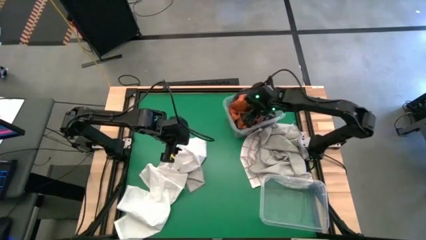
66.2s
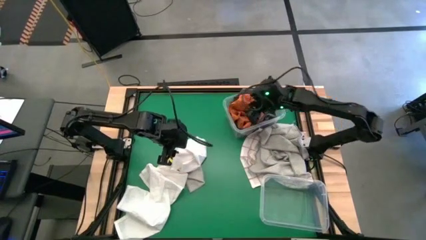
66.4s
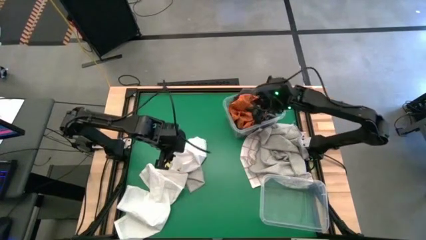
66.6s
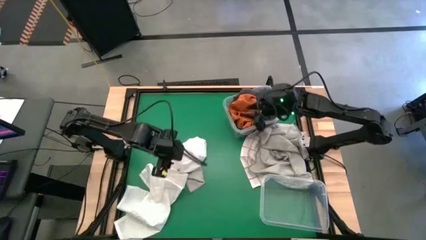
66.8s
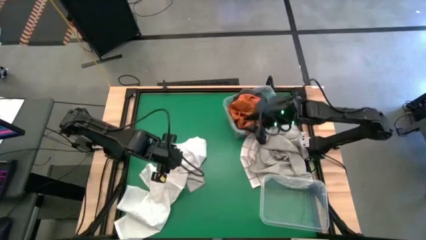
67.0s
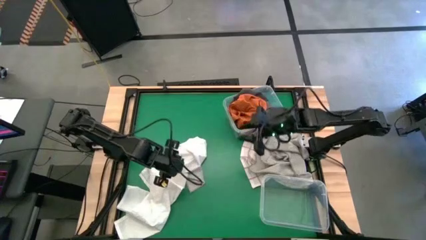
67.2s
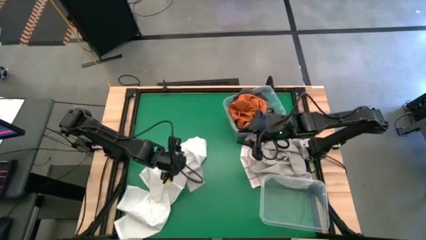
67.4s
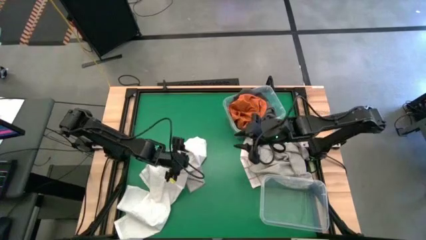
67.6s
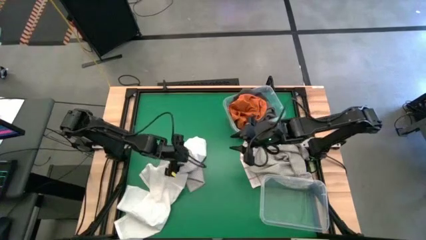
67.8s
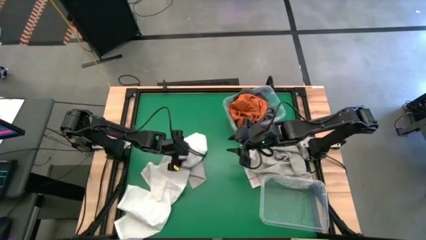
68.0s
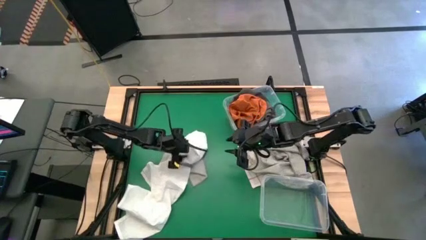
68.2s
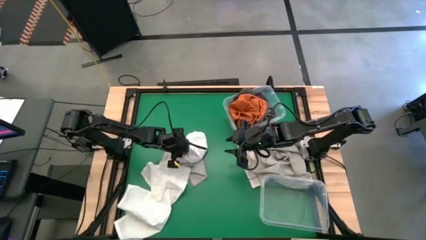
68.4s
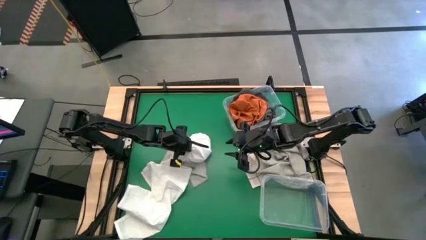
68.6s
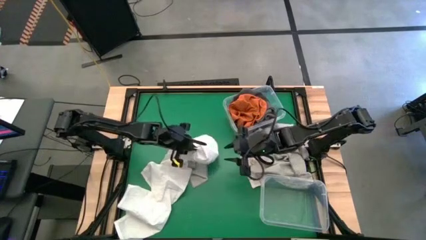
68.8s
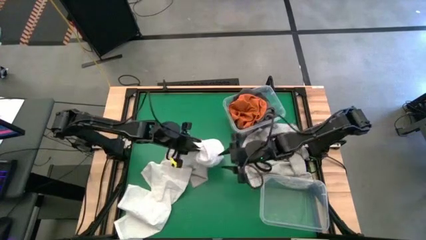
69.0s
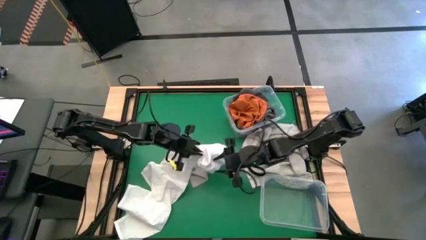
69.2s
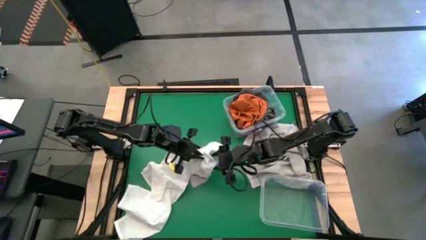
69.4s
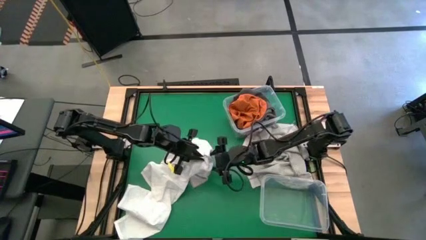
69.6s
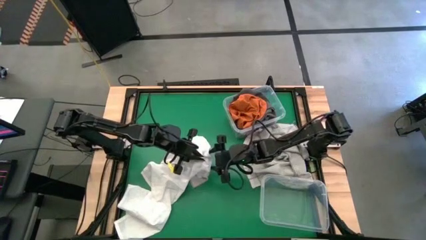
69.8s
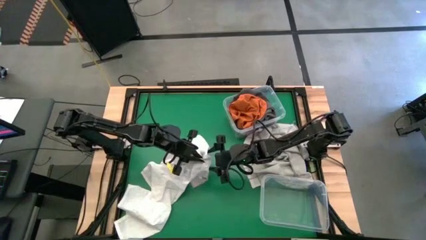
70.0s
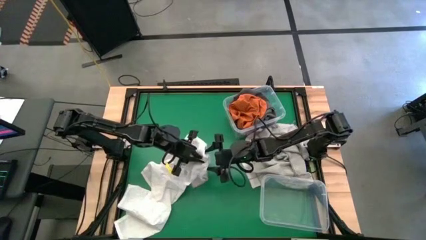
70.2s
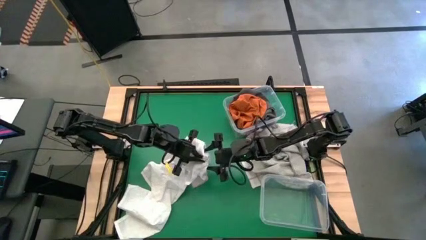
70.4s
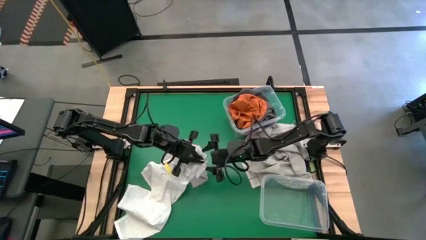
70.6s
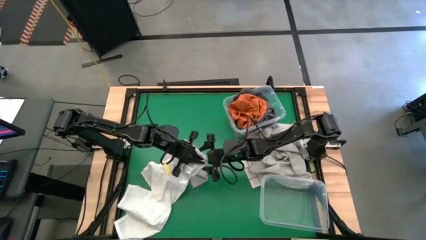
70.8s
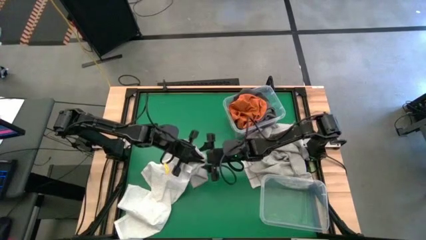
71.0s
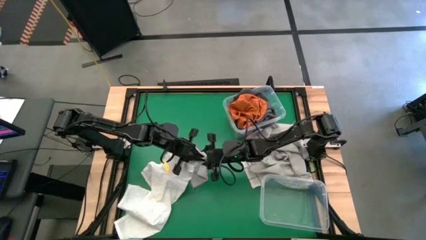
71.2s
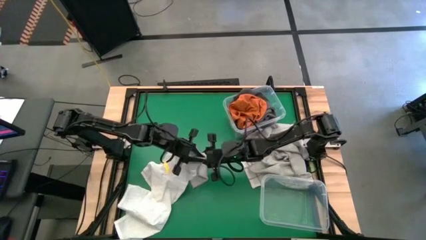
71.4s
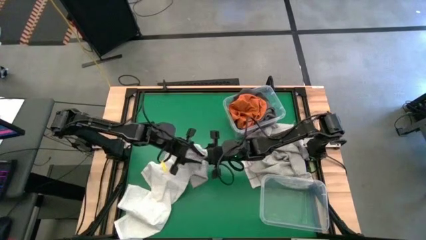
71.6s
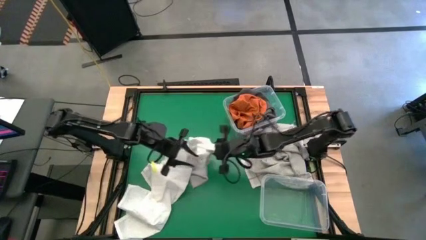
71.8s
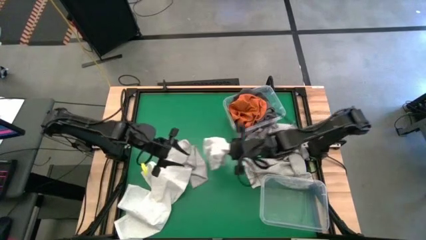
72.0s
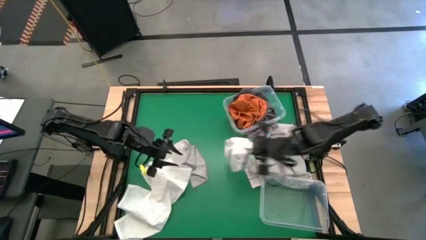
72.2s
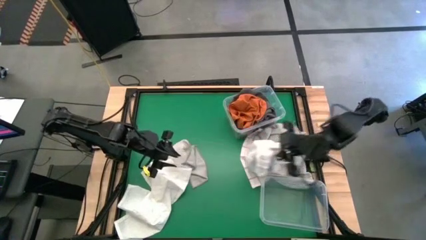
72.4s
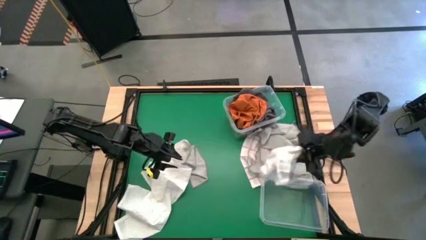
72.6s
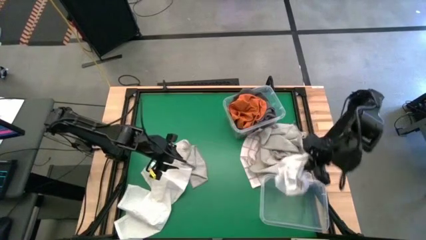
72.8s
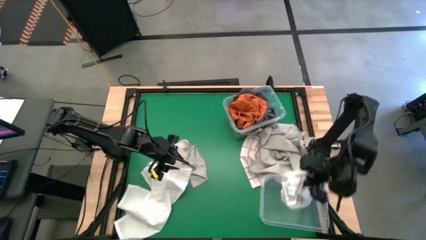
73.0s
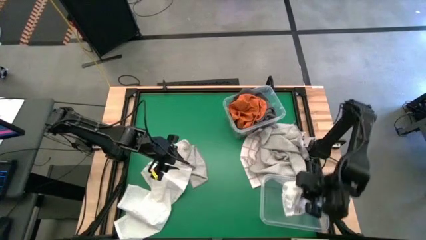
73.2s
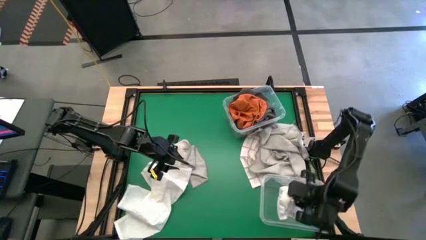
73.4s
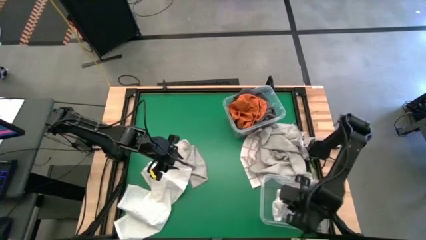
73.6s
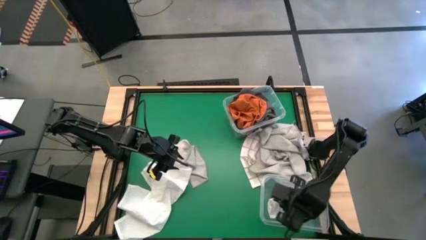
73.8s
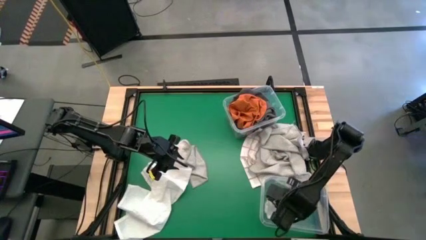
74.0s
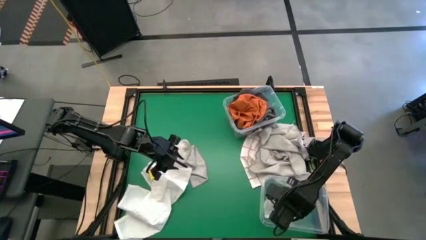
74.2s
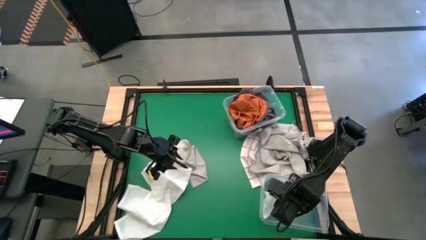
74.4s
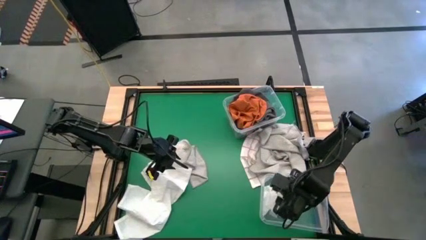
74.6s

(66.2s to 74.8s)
Task: Sort towels by color in basket
Put the white towel into the bottom transparent bin

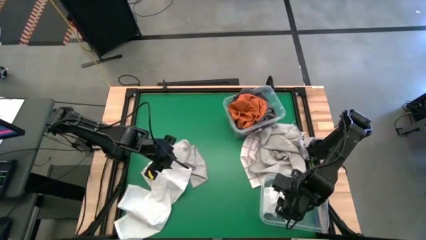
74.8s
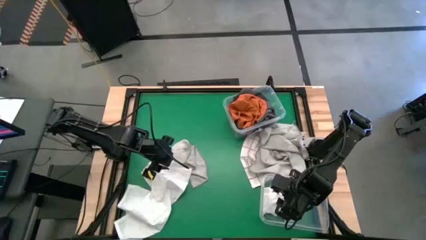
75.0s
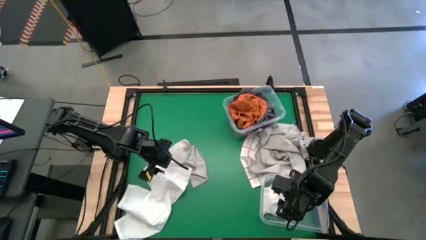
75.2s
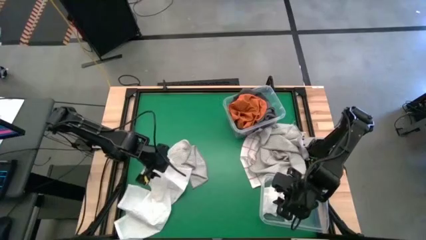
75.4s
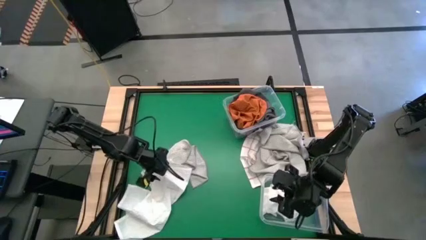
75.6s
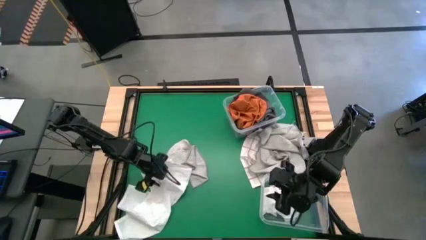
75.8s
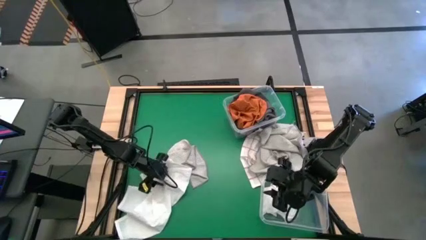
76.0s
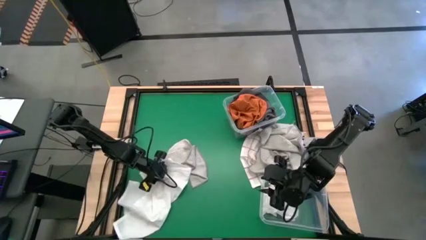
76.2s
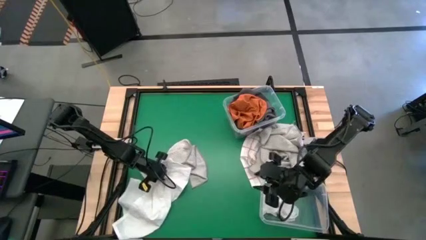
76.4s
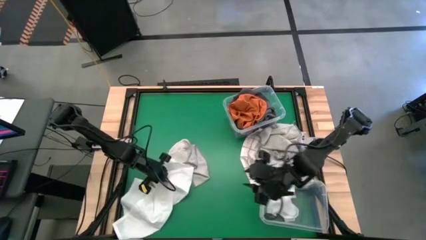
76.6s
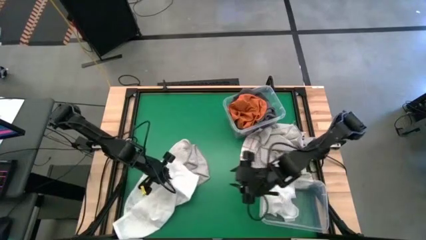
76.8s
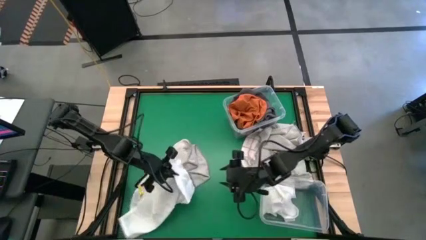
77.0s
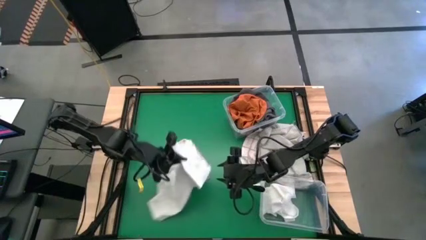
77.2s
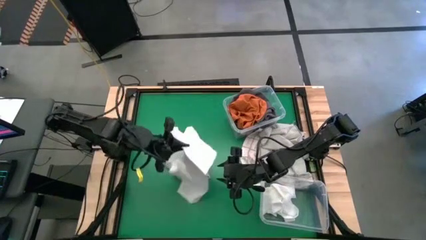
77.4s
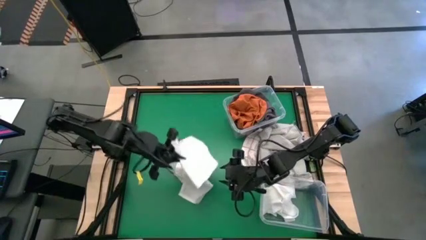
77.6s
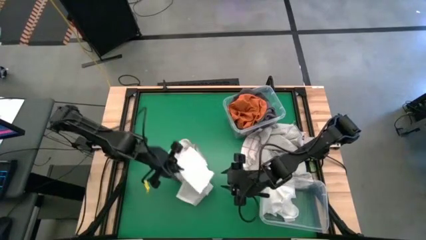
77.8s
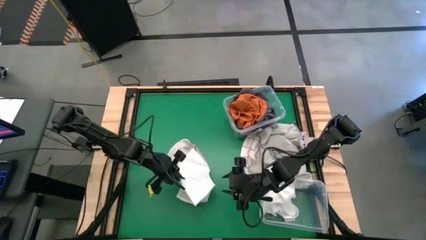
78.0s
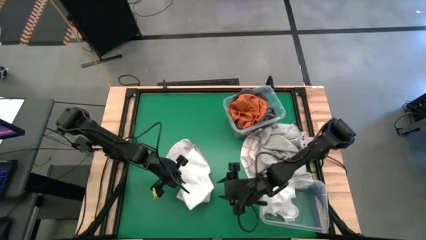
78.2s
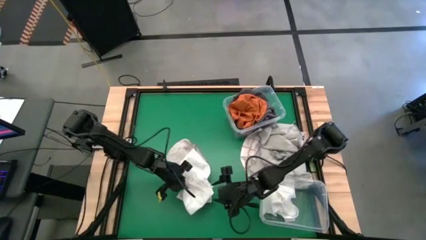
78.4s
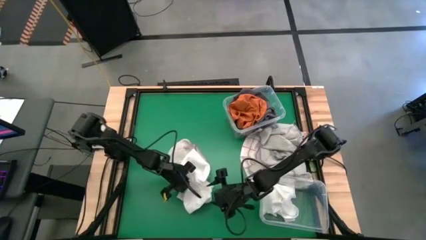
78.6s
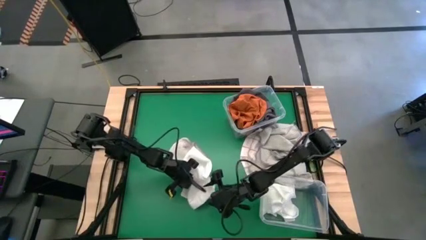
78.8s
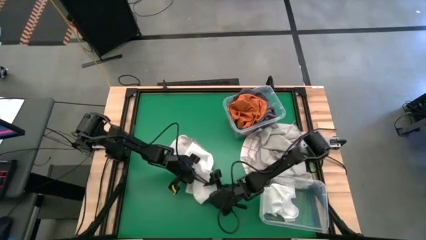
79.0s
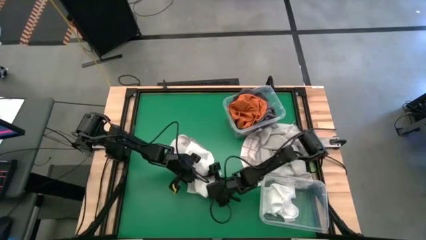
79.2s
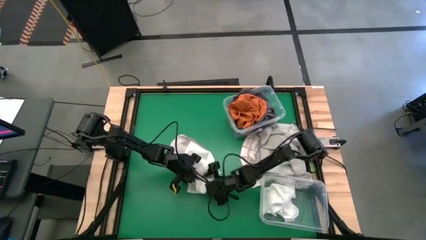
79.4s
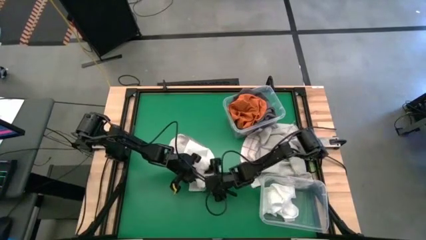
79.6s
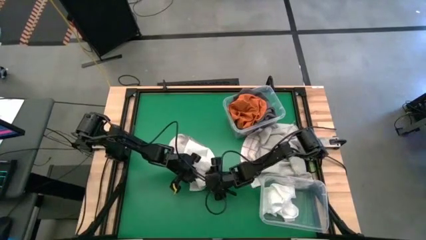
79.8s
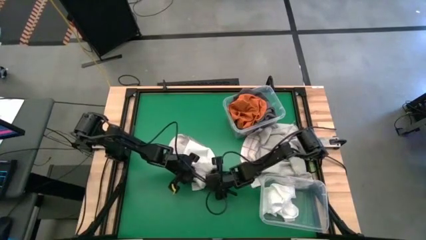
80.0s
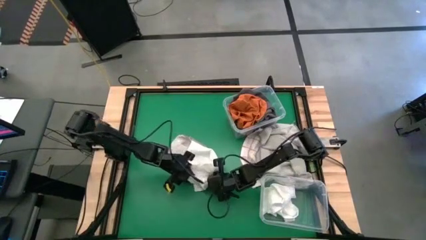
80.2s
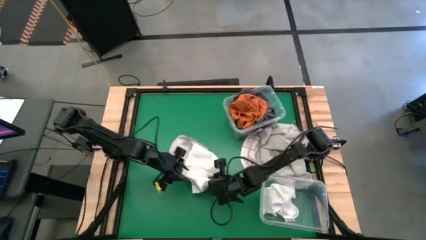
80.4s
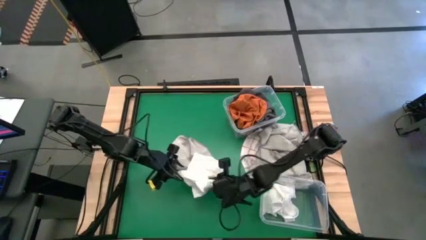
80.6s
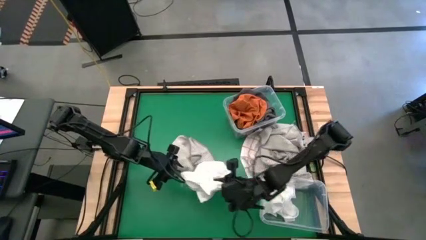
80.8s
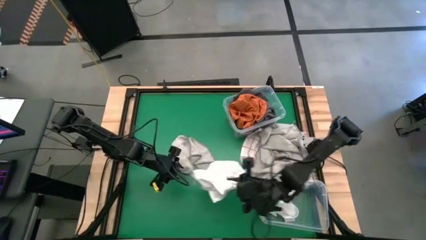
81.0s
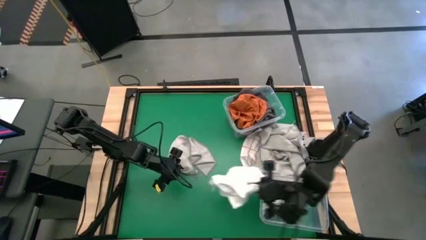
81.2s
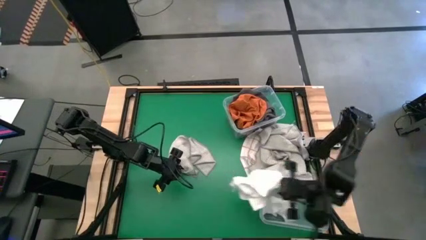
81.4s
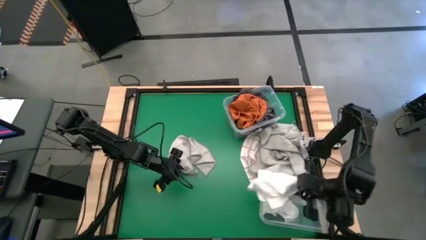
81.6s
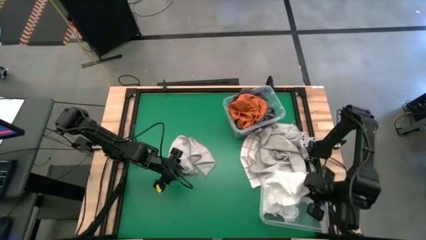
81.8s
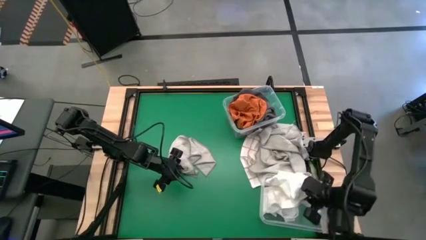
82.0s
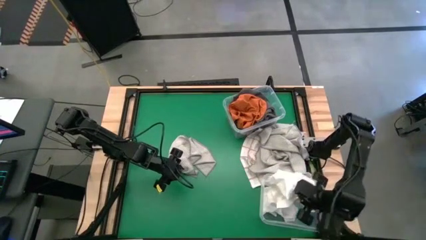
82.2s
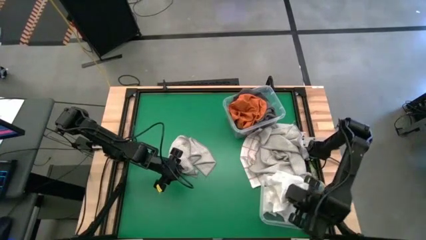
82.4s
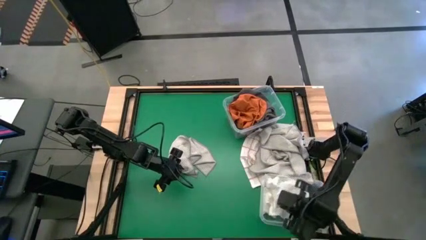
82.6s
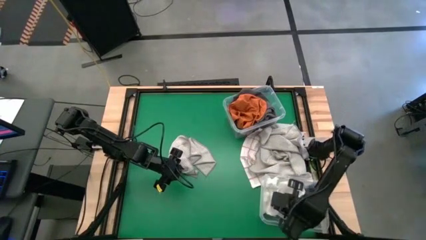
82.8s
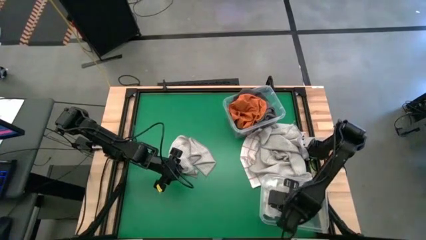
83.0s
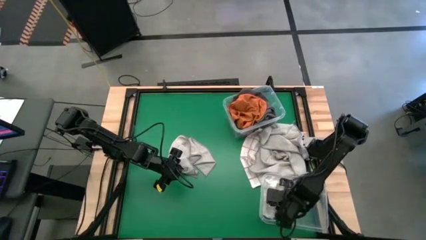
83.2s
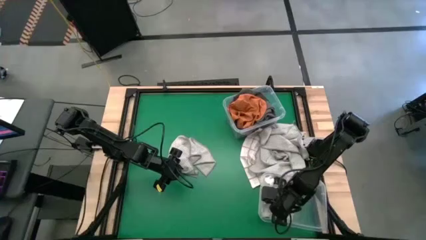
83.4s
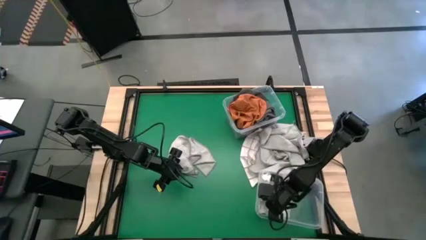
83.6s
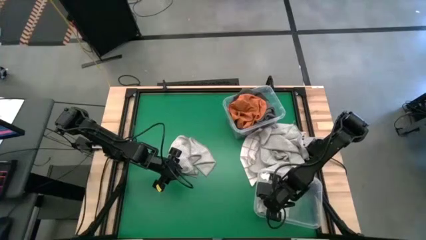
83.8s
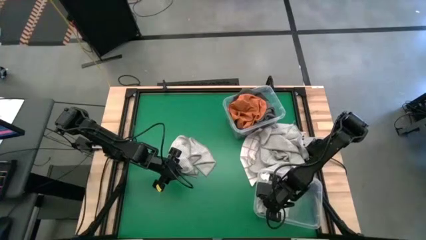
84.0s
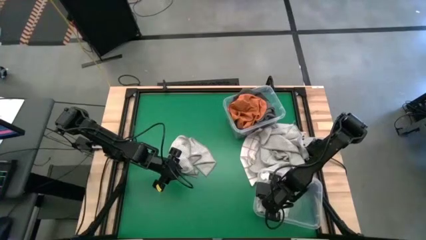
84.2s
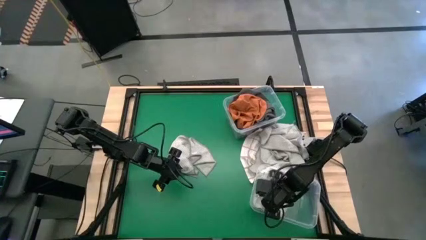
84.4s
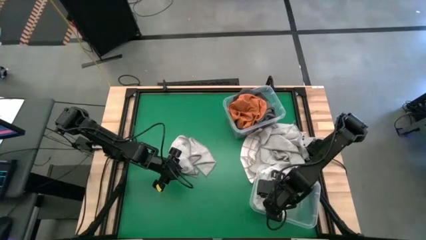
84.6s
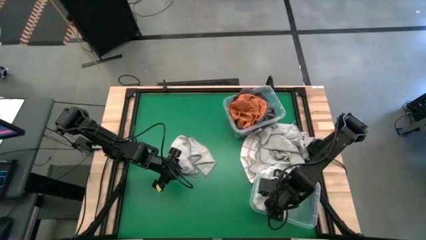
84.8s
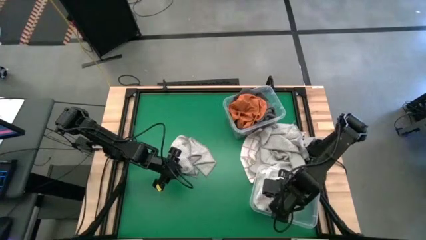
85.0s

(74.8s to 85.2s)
Put the white towel into the bottom transparent bin
